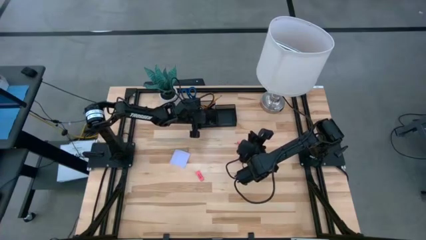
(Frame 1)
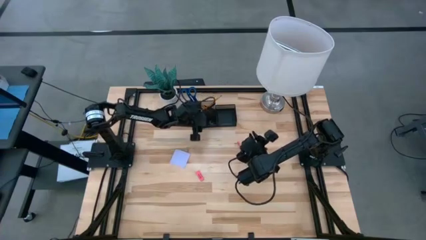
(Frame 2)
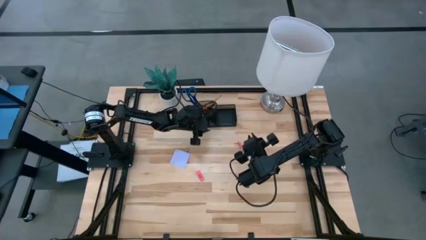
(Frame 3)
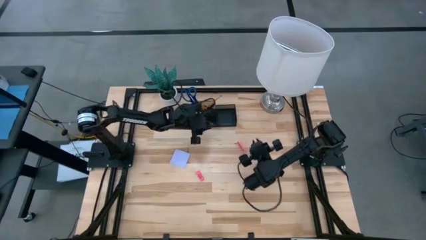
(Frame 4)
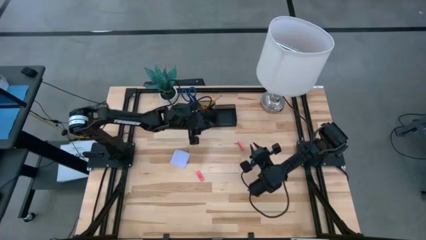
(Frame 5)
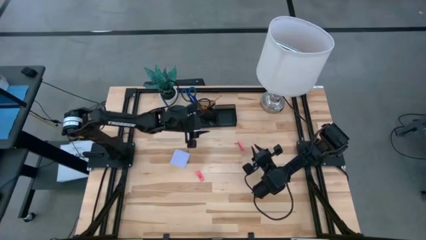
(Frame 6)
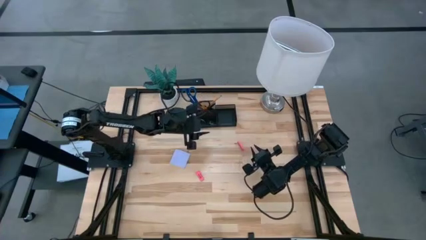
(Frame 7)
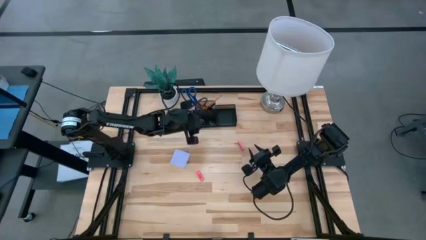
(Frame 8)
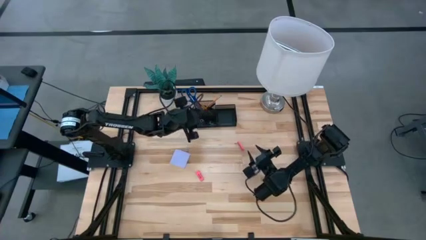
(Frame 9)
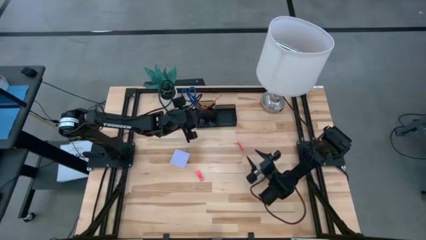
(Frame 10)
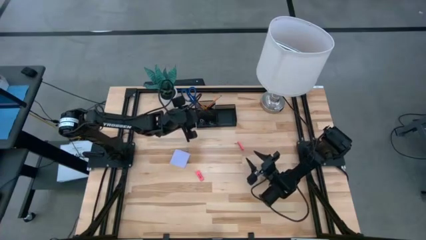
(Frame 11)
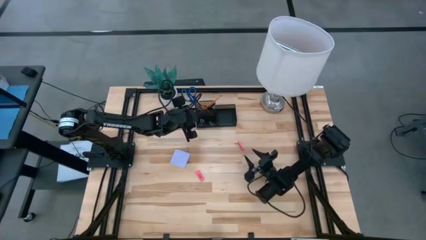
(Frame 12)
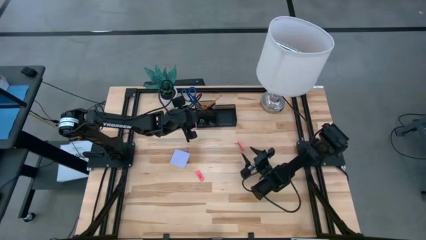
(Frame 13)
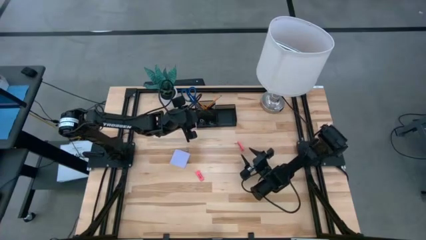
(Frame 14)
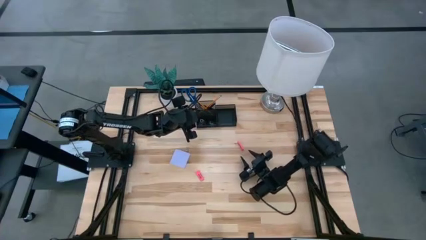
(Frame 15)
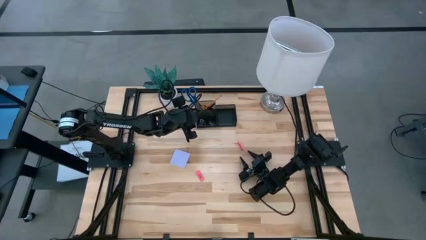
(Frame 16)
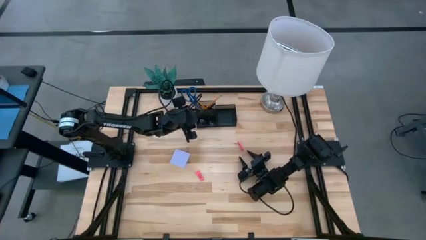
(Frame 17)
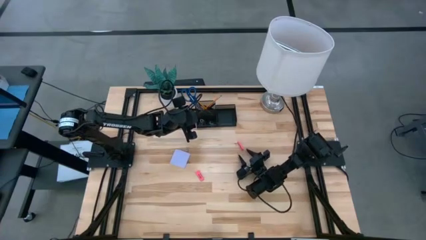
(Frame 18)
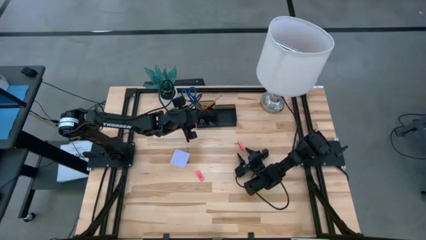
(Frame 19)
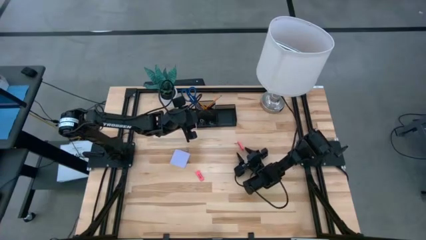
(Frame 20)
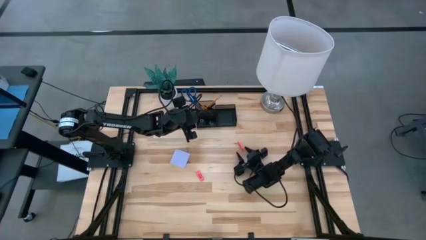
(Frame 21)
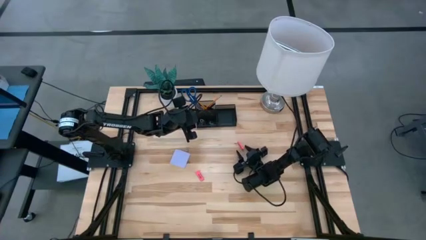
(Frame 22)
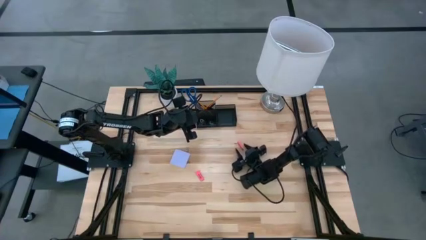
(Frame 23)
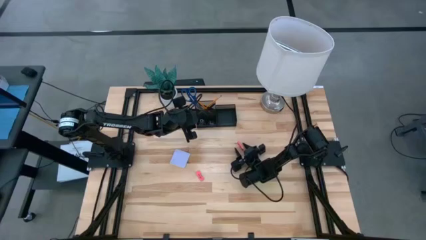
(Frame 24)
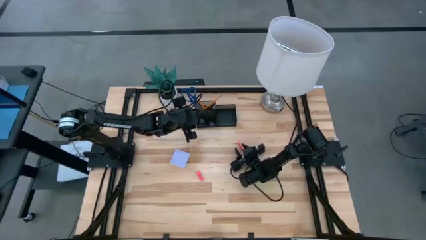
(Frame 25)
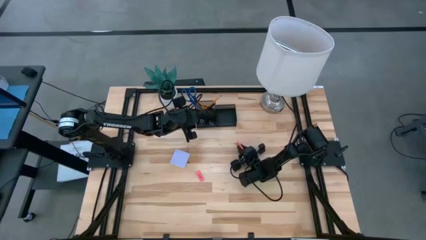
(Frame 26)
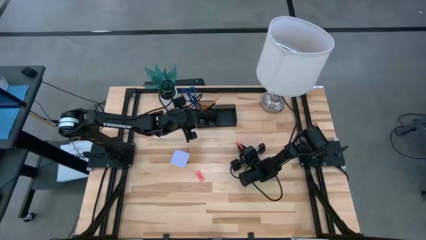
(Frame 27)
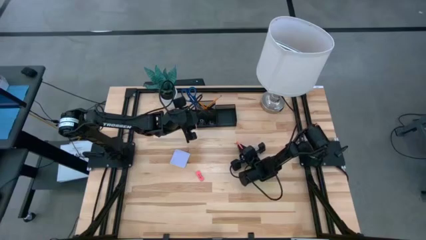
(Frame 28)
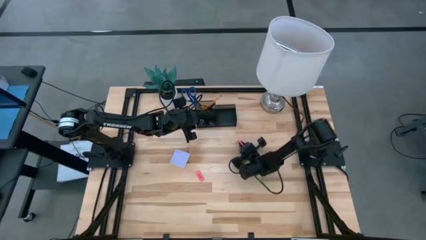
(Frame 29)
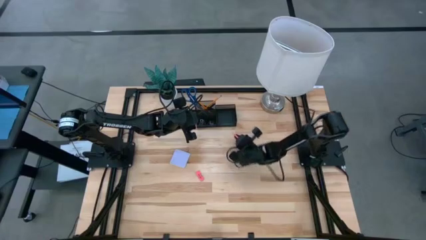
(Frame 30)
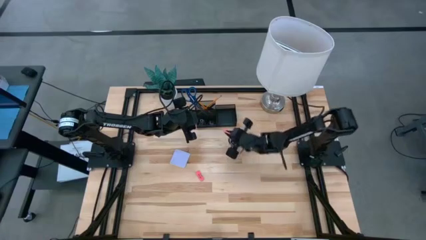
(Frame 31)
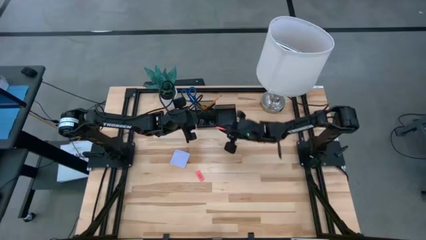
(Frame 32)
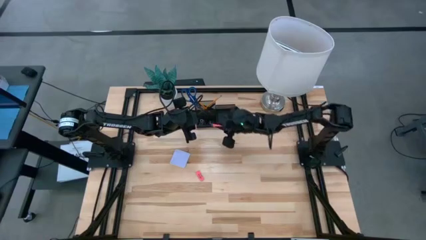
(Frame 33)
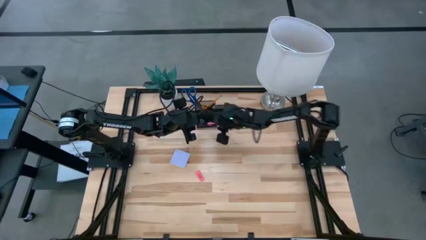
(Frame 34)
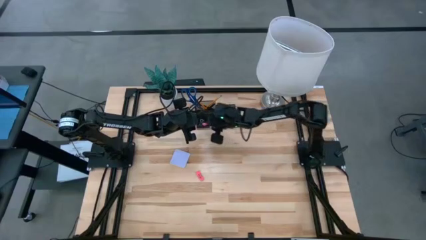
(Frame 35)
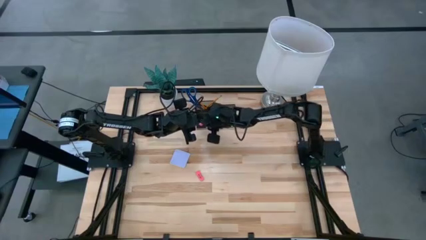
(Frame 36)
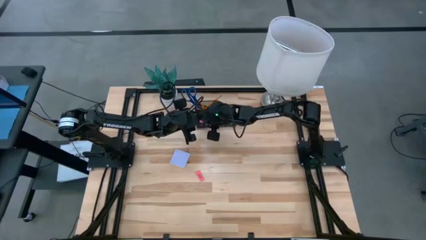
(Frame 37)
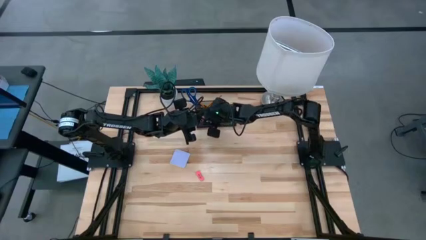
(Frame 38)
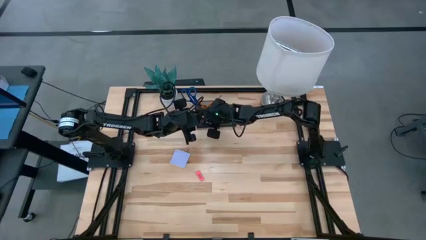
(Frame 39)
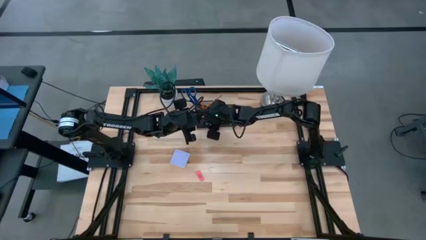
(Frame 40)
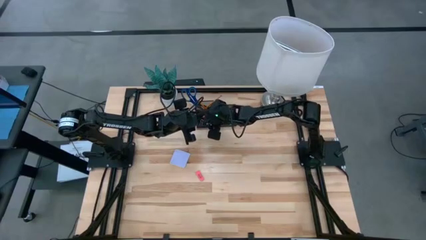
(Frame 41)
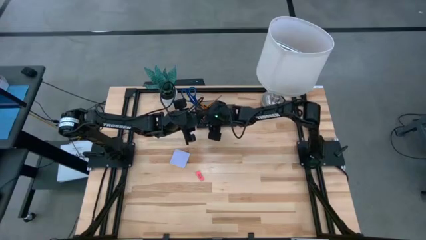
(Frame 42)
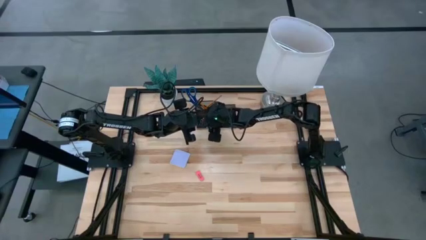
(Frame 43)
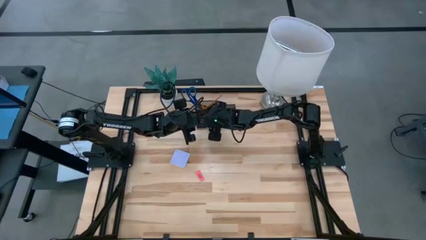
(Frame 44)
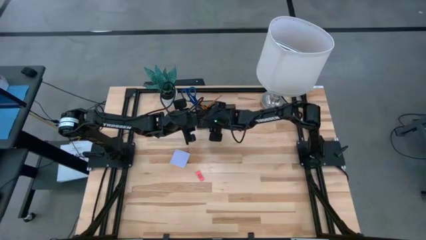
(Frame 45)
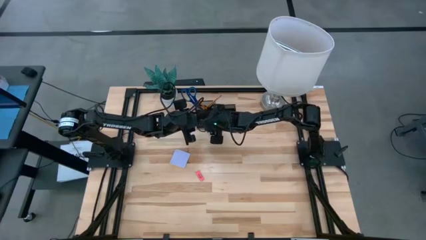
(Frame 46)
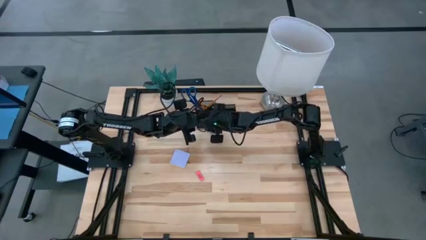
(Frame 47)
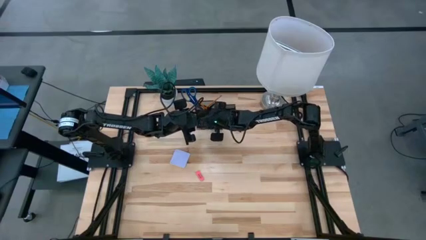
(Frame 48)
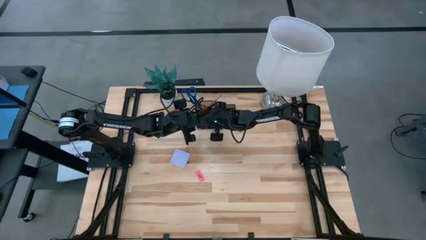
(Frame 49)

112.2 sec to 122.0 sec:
Task: Pick and place office supplies into organizer
Put the right pink eraser into the desk organizer

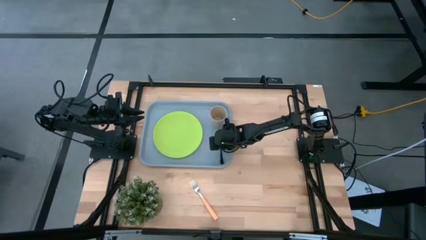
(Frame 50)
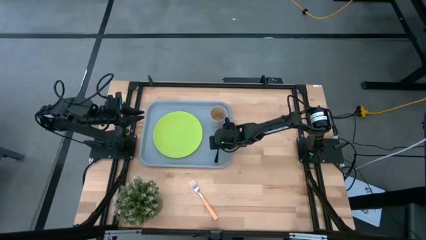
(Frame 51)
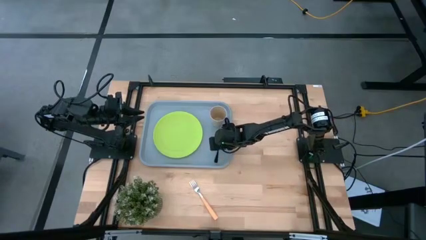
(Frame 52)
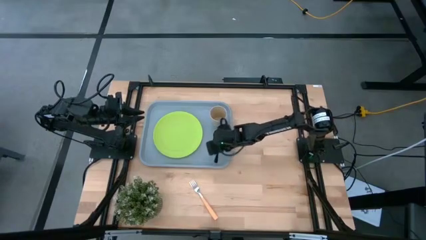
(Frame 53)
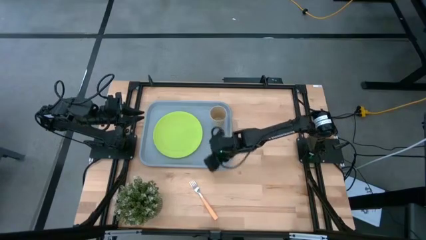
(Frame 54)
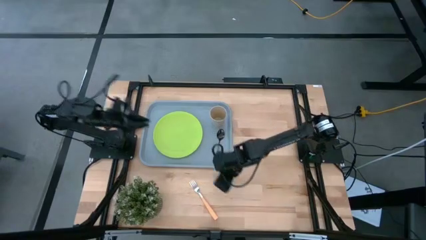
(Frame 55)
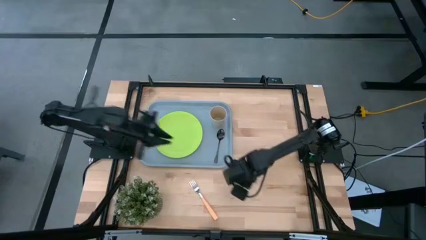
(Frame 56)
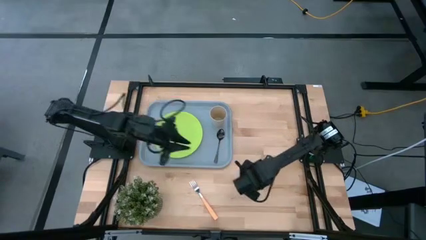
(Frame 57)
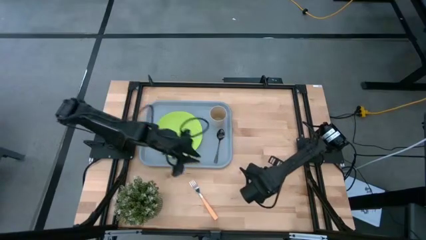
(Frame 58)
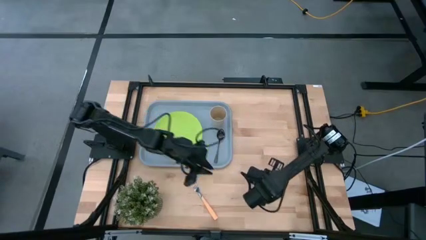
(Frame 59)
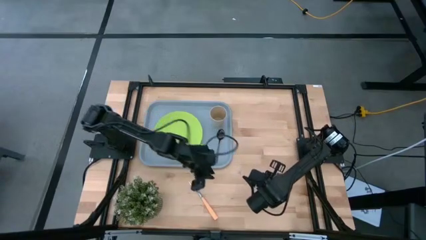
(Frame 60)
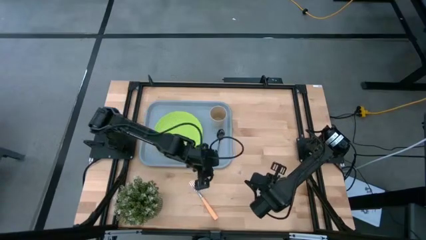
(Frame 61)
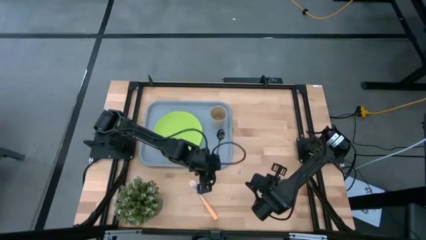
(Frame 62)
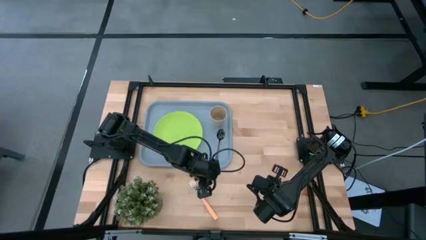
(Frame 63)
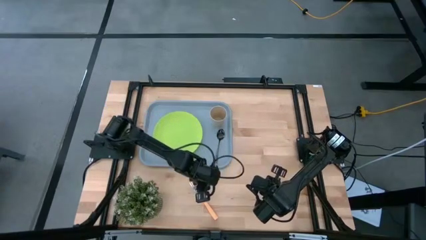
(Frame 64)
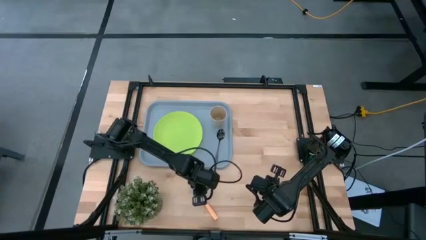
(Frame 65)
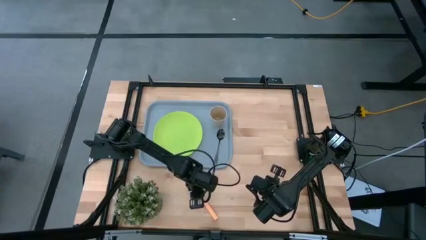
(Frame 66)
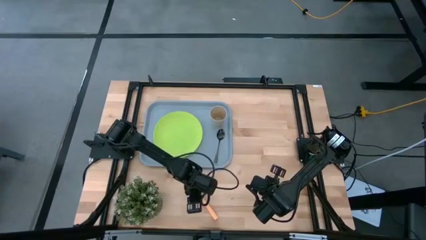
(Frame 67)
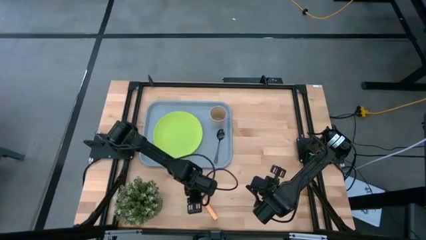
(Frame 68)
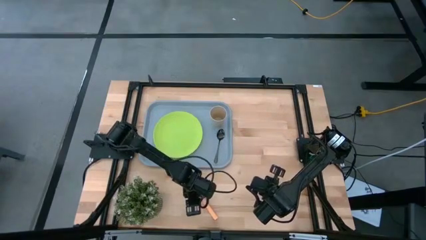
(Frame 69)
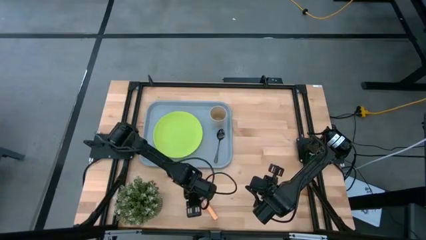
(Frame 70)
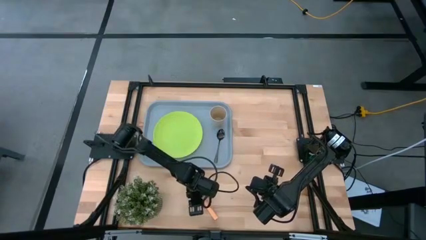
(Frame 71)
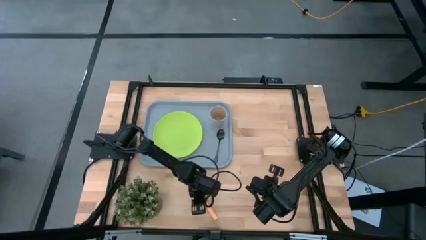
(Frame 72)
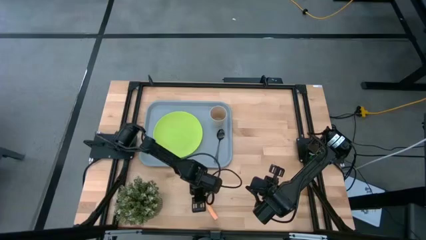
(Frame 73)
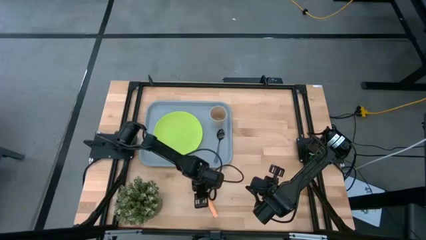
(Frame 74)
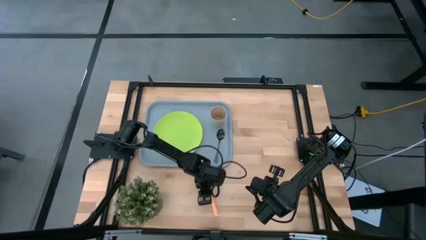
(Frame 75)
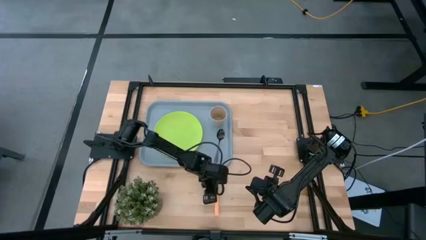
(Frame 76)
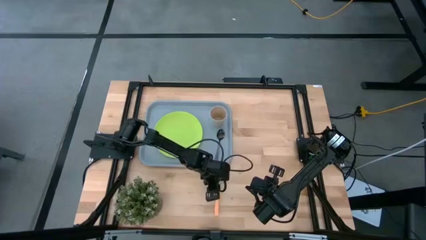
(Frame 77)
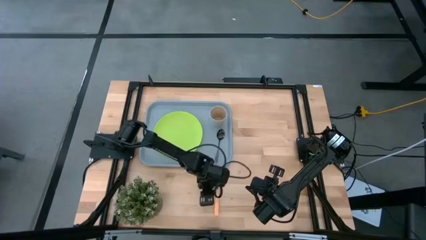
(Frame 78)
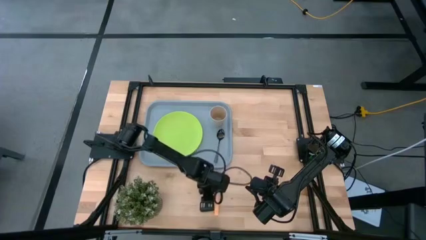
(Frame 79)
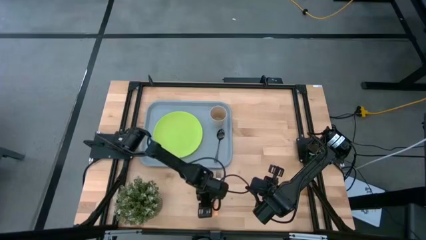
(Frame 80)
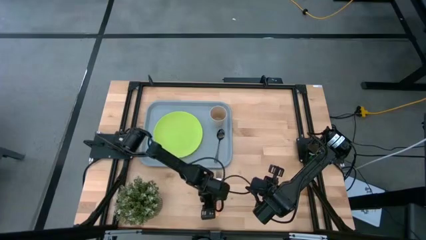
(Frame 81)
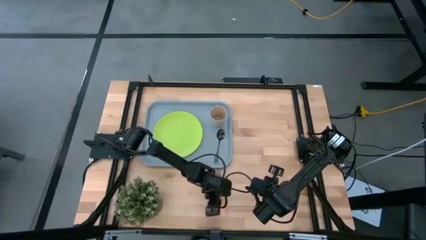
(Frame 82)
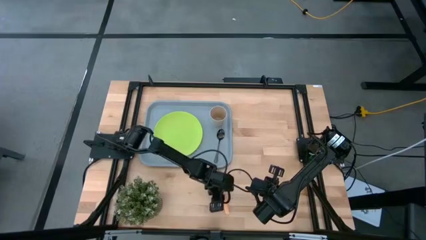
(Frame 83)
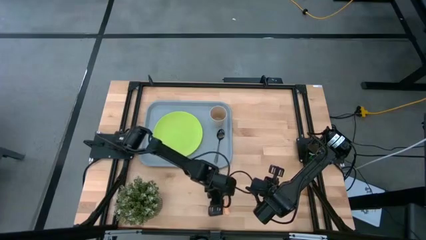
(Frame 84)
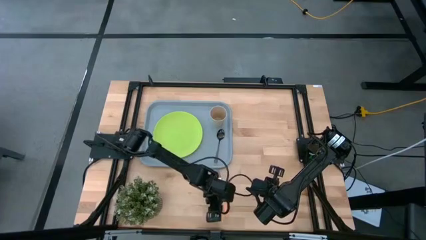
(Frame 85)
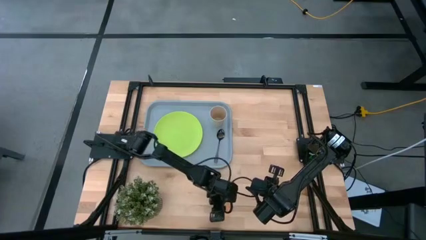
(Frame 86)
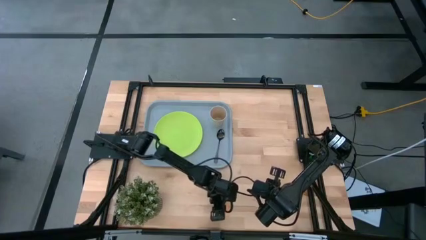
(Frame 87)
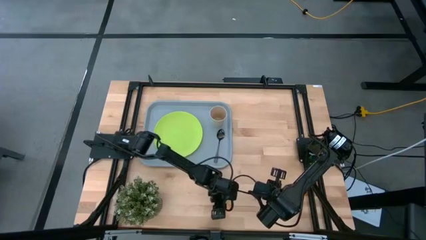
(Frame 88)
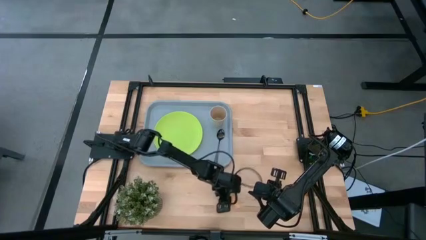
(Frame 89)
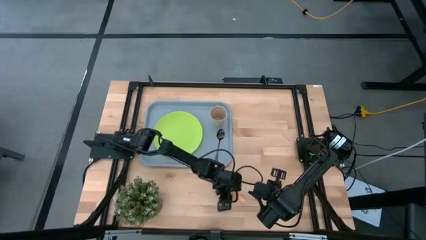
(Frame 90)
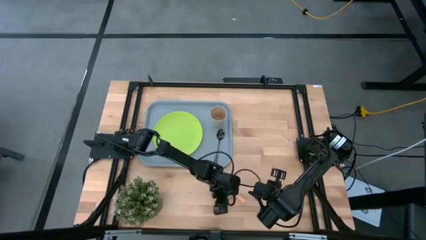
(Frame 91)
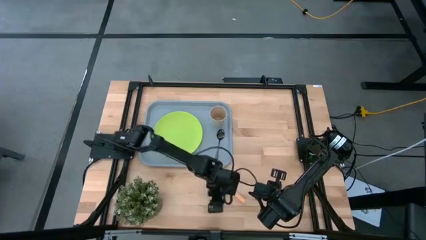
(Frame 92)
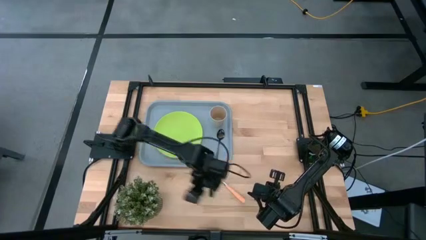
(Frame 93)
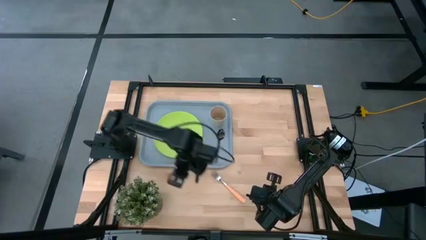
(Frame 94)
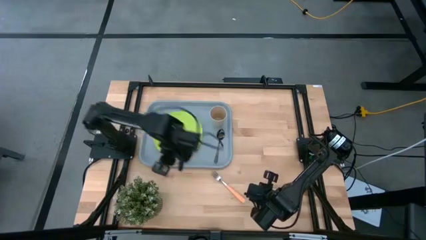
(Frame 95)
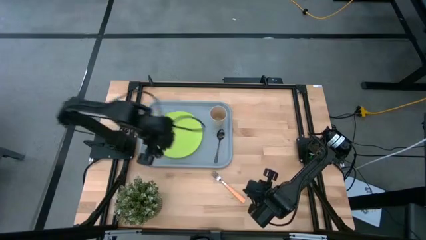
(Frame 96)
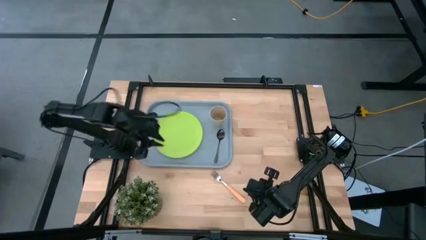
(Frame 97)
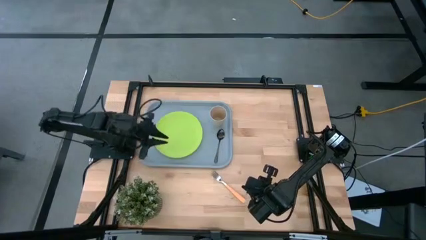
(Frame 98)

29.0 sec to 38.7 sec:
Task: Pick and place plate/cup/fork/spoon on tray
Put the orange fork on the gray tray to the right of the green plate
